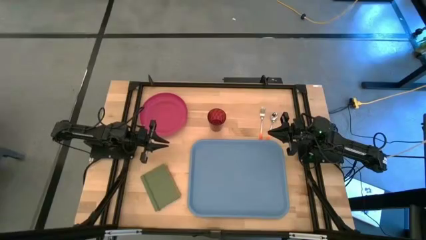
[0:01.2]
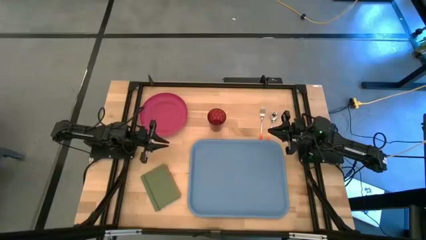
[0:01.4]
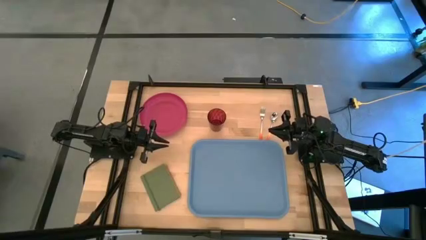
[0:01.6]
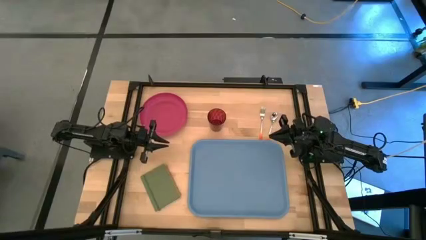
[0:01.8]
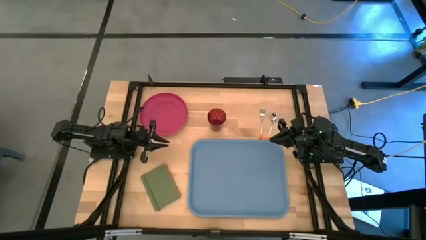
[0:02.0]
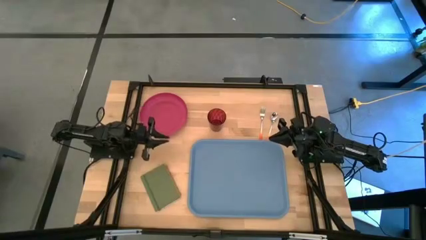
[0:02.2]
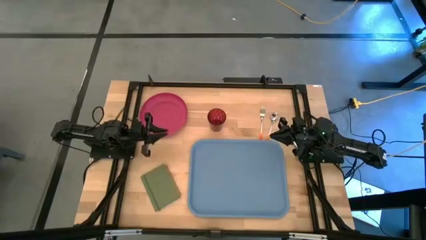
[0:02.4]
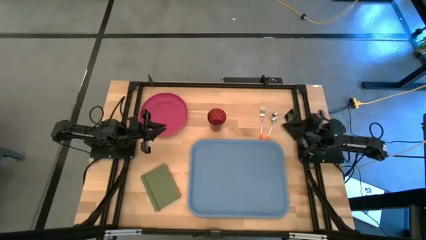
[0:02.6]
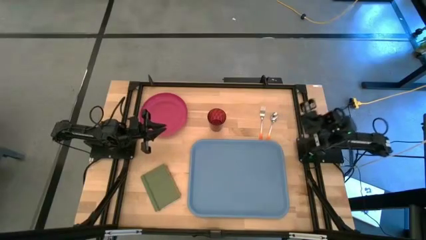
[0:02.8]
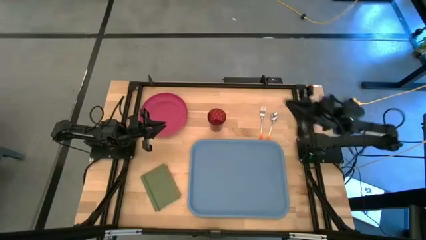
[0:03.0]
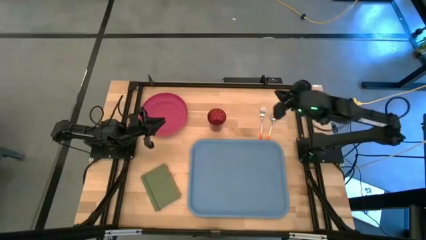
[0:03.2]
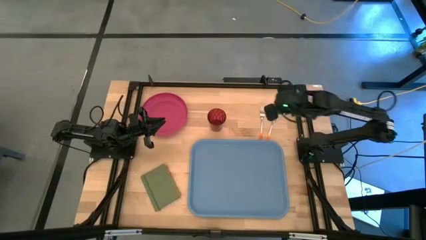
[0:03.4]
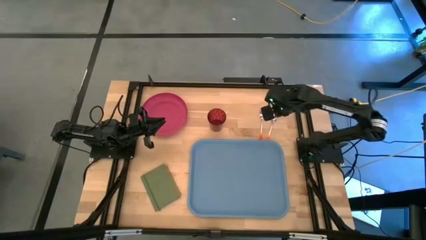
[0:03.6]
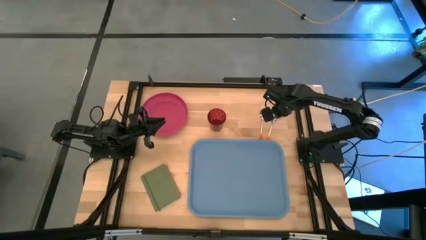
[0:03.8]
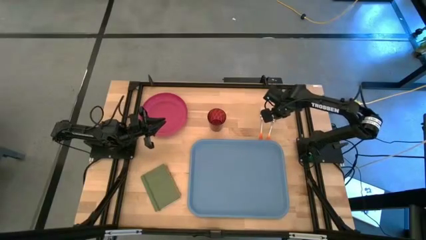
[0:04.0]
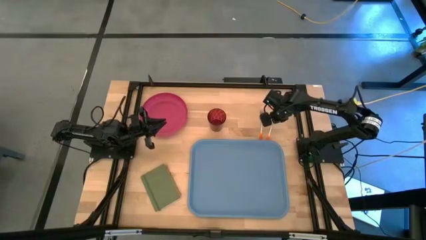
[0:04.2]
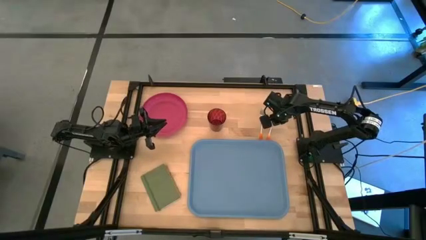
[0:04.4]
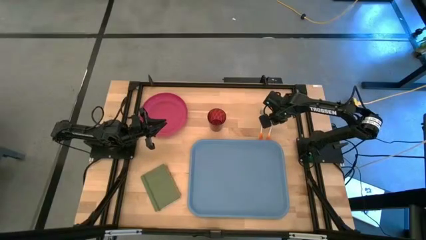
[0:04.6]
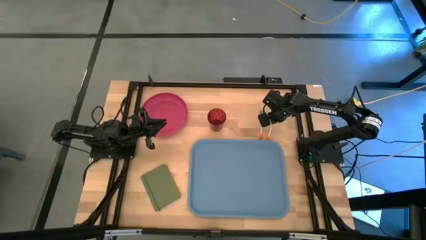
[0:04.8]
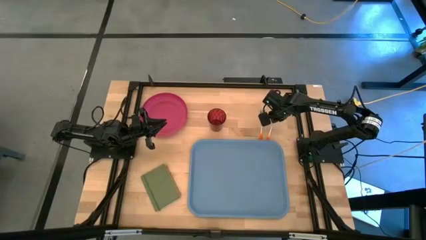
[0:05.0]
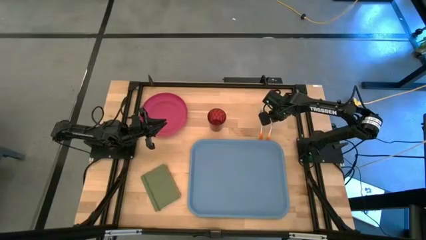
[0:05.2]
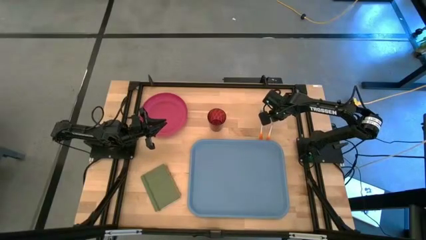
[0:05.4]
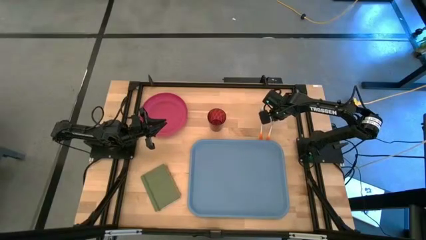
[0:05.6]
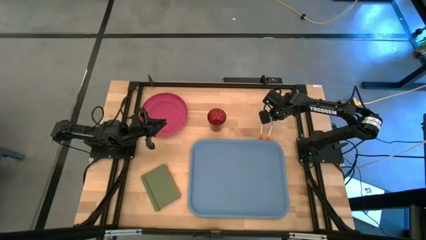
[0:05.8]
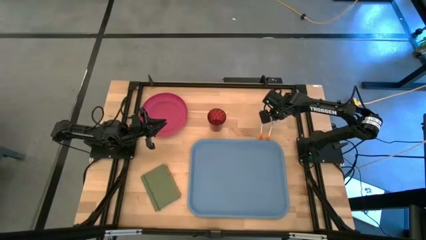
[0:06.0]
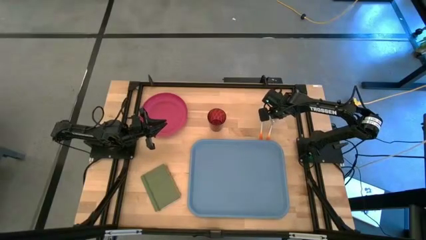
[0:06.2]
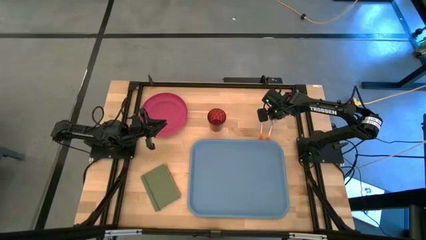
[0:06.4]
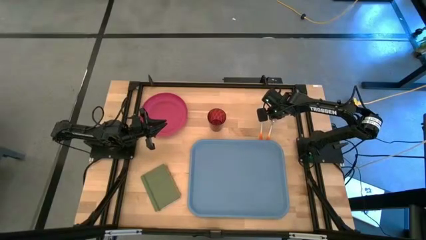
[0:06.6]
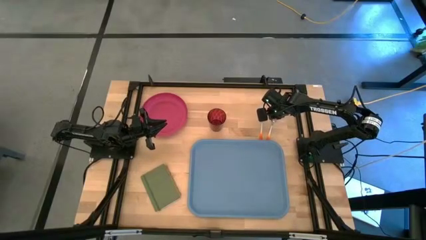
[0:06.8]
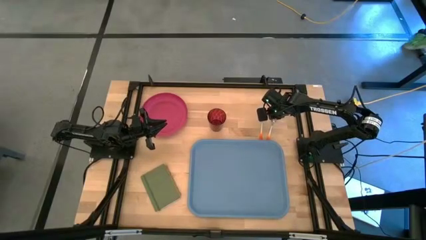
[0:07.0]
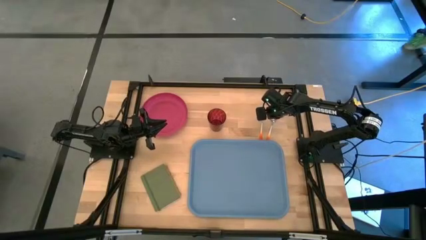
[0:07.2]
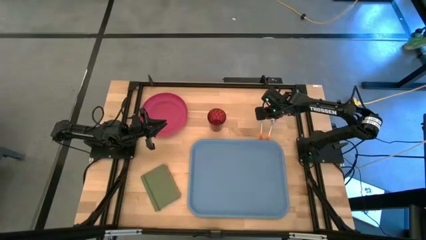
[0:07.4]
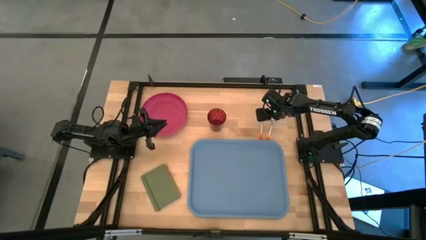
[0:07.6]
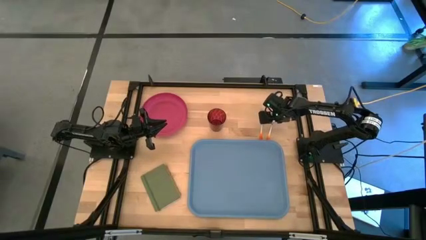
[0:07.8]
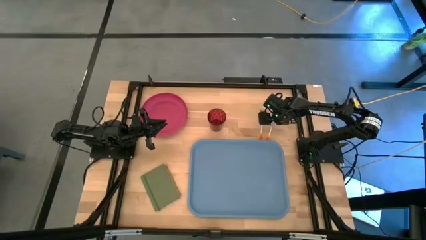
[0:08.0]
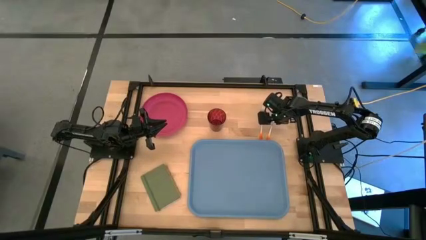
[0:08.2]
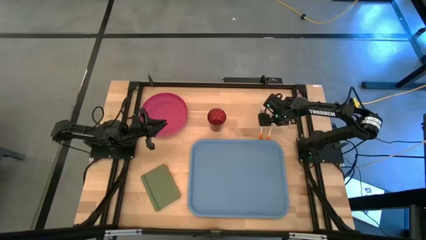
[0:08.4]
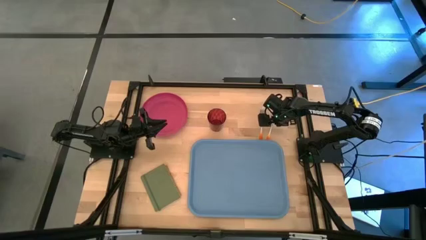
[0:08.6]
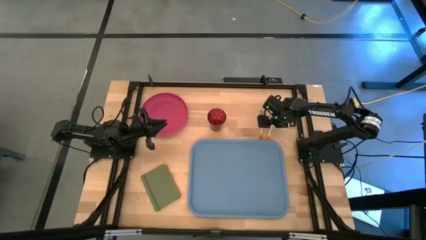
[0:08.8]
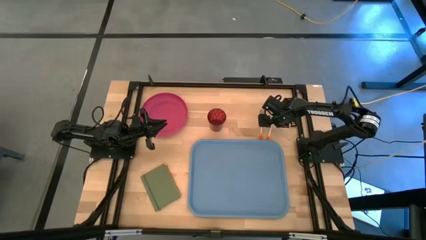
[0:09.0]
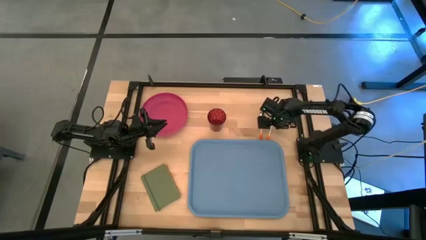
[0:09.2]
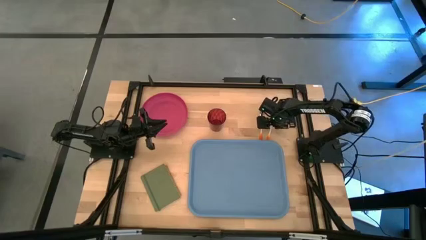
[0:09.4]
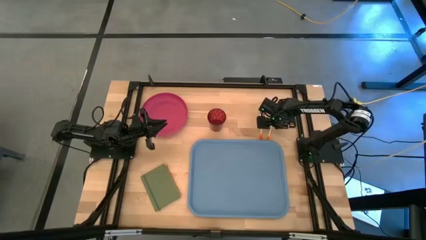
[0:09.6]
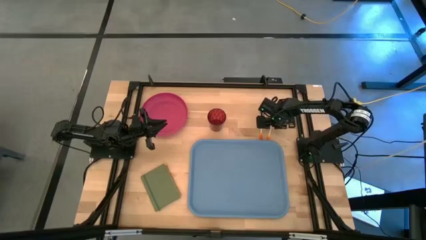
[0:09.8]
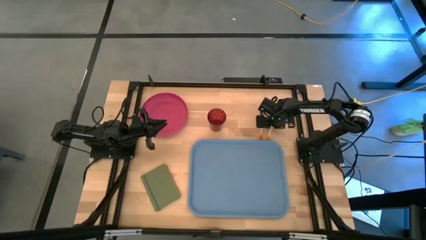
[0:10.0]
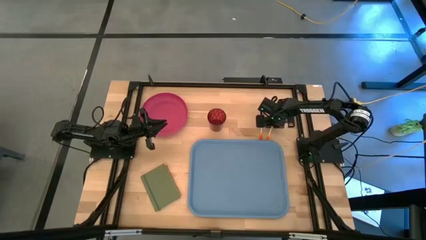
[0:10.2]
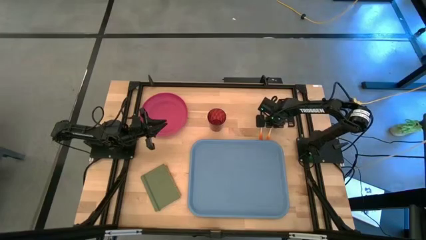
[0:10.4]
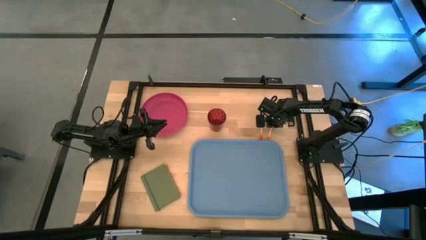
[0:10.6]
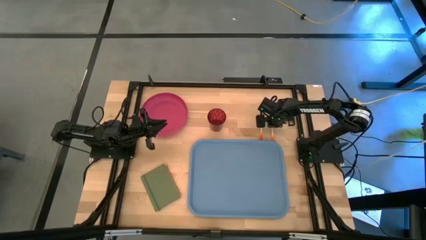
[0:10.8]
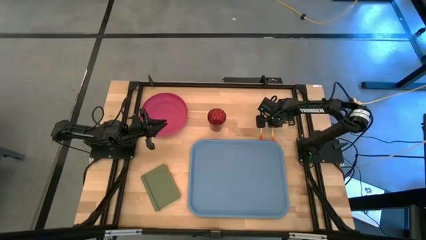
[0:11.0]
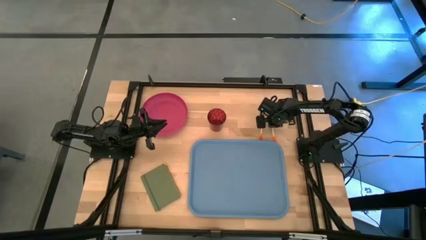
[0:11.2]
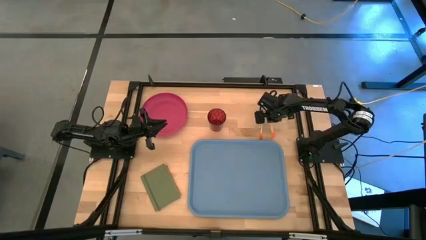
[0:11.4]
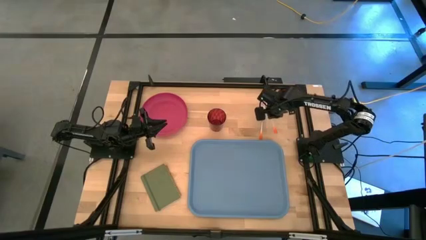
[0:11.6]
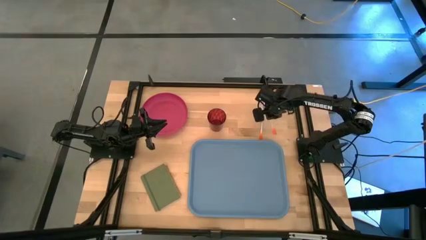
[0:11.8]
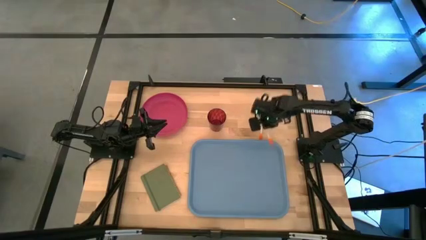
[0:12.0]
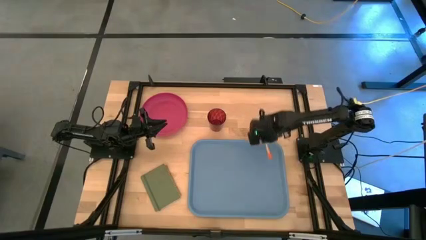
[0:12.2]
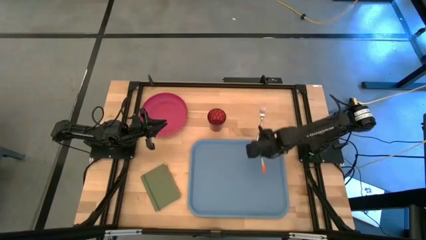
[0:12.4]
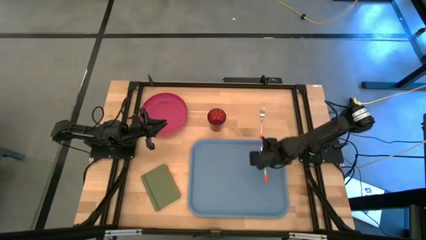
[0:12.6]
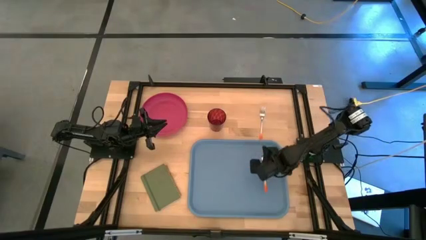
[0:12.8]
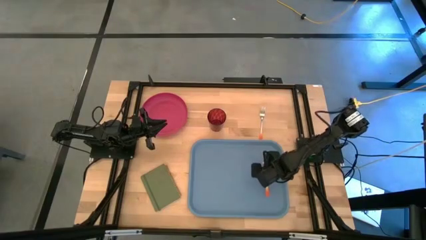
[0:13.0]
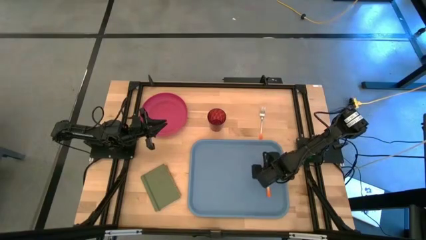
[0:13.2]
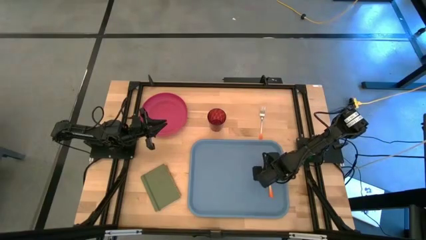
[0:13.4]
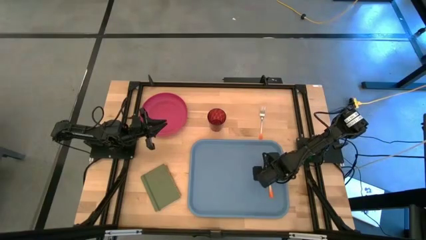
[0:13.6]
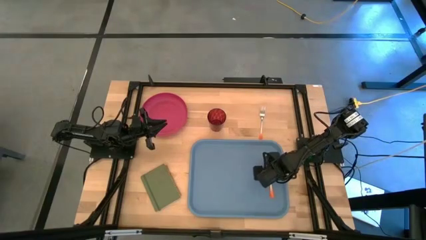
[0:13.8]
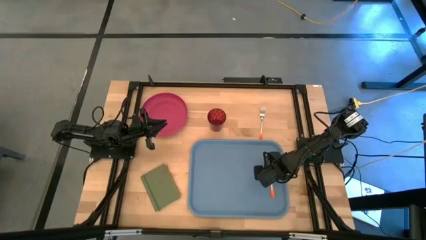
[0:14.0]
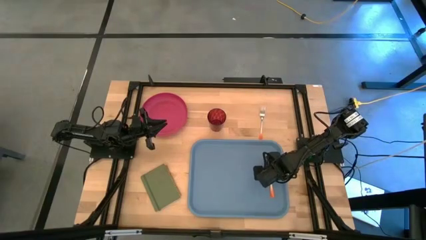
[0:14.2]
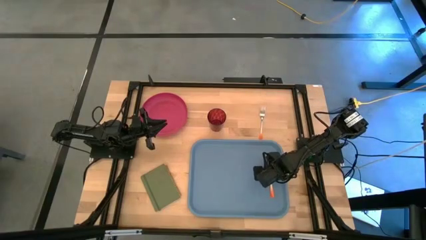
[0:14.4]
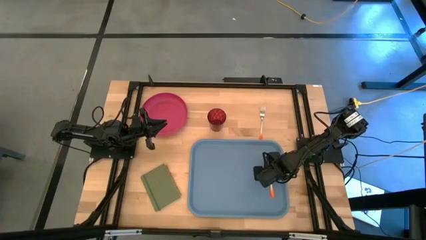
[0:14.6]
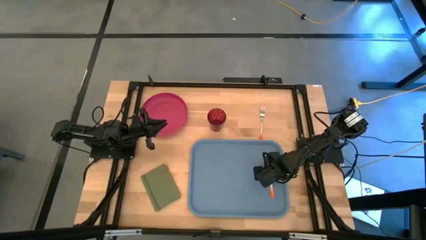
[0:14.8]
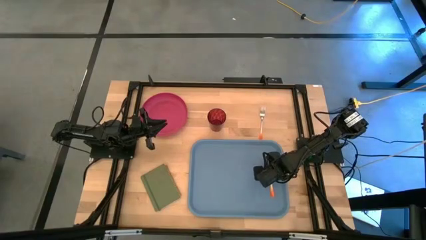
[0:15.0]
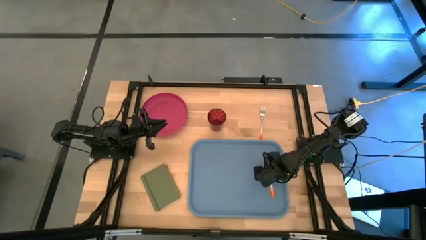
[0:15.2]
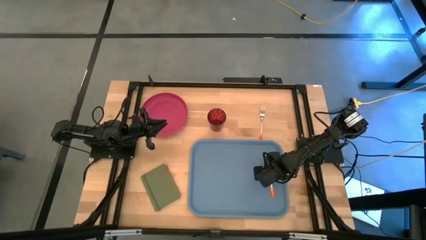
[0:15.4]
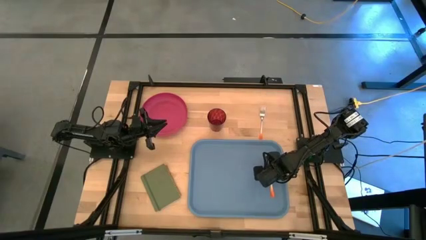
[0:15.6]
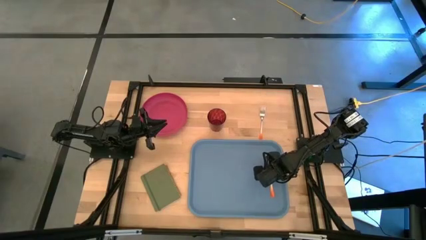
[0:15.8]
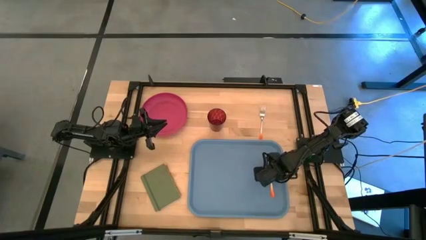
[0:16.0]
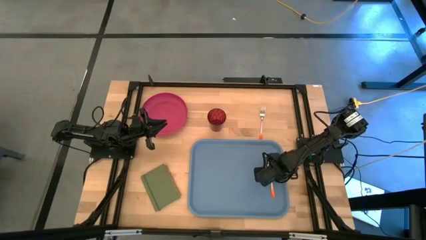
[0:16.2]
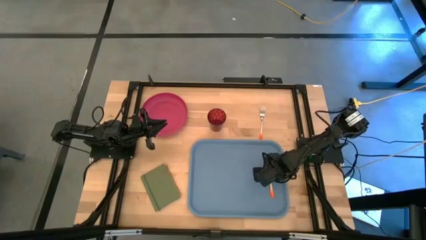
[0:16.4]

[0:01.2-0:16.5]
Task: Pick and place plate/cup/fork/spoon on tray
Put the orange spoon on the blue serving tray
